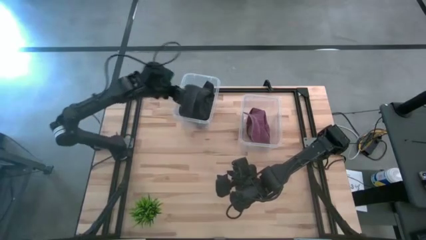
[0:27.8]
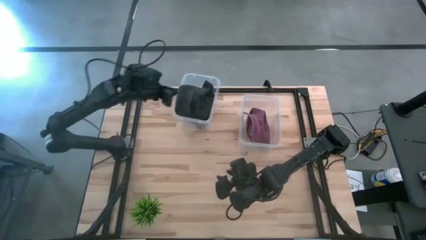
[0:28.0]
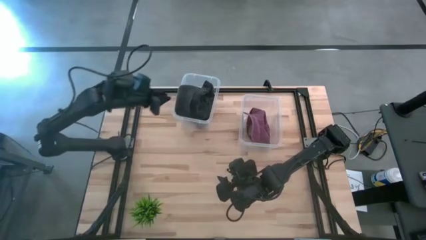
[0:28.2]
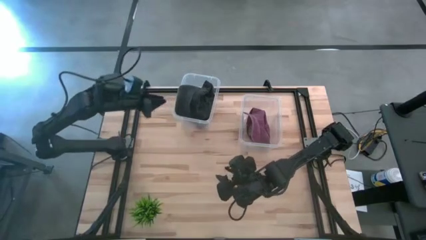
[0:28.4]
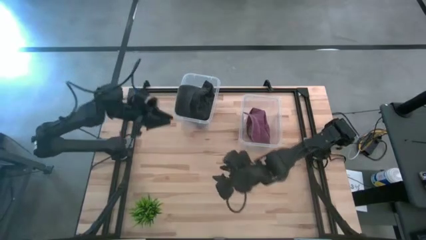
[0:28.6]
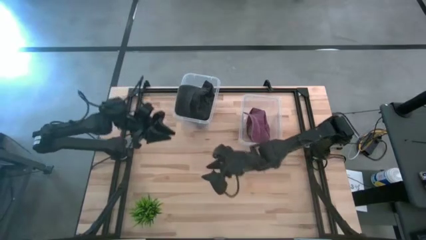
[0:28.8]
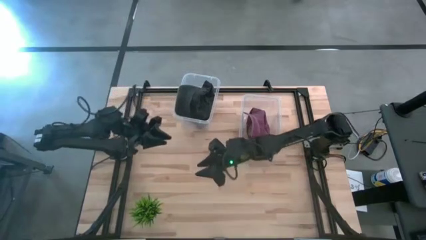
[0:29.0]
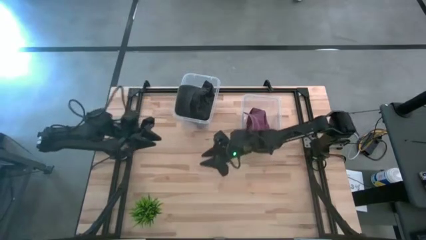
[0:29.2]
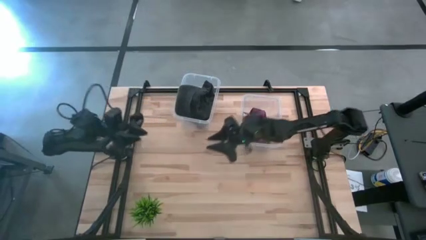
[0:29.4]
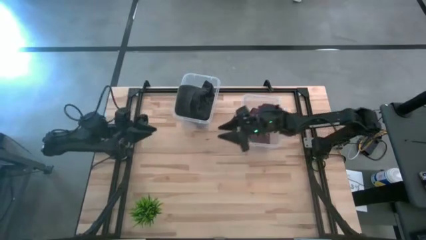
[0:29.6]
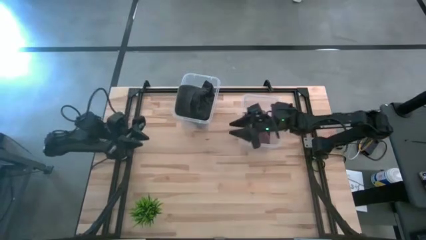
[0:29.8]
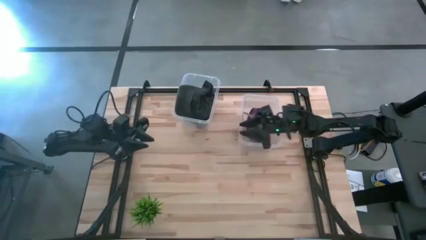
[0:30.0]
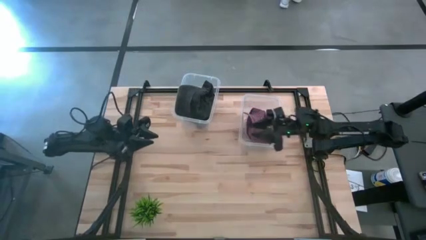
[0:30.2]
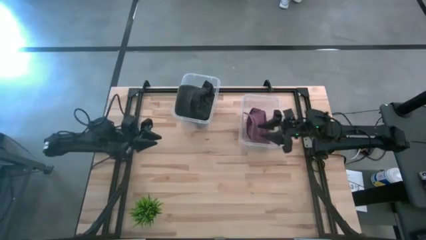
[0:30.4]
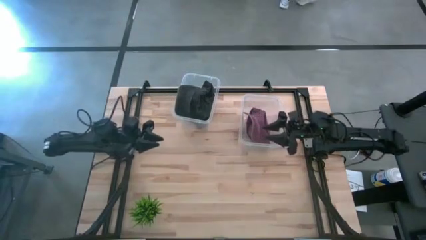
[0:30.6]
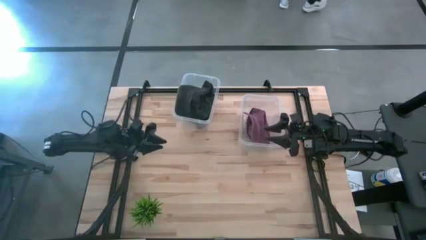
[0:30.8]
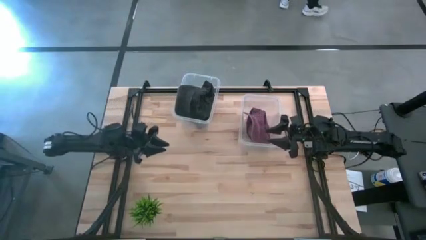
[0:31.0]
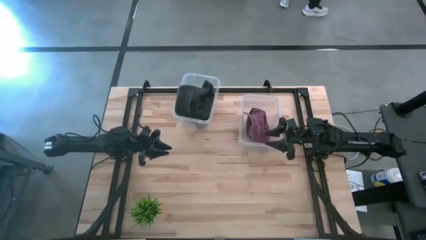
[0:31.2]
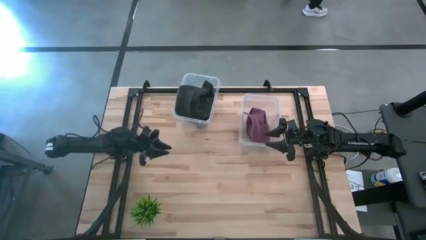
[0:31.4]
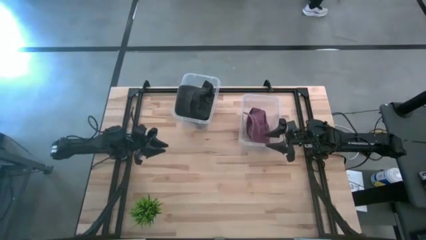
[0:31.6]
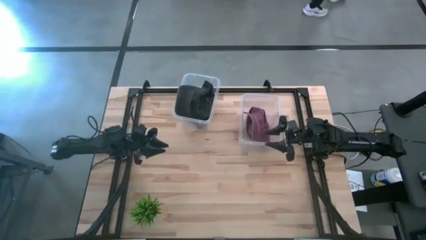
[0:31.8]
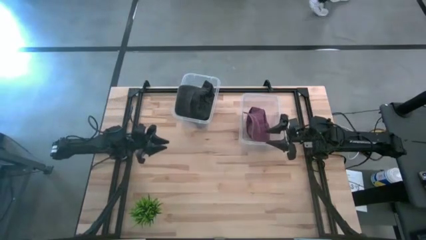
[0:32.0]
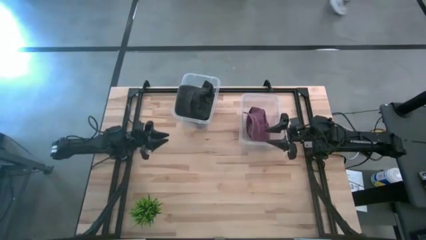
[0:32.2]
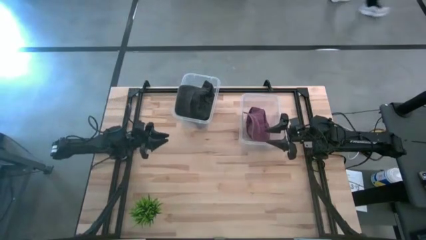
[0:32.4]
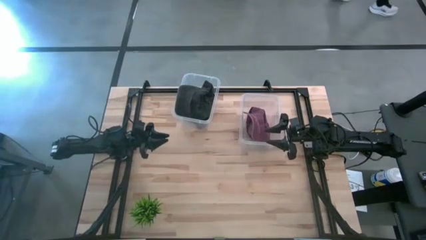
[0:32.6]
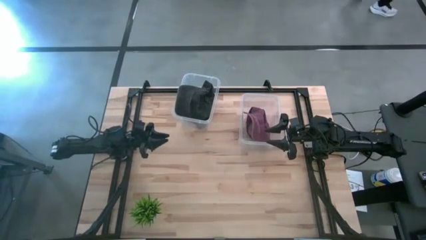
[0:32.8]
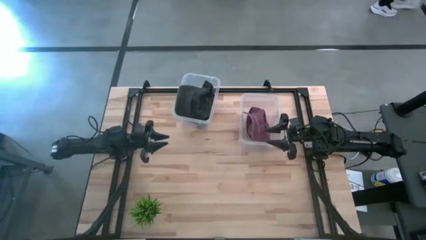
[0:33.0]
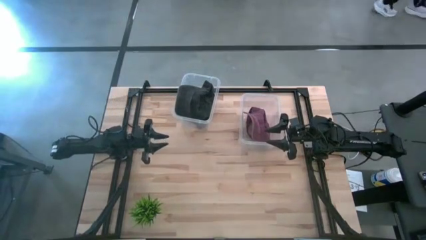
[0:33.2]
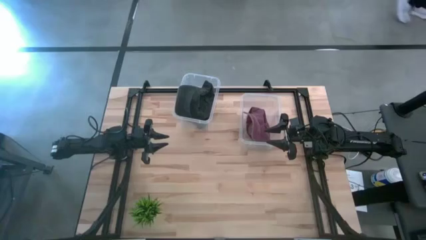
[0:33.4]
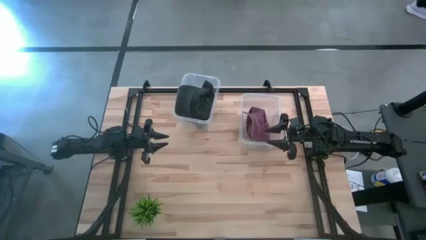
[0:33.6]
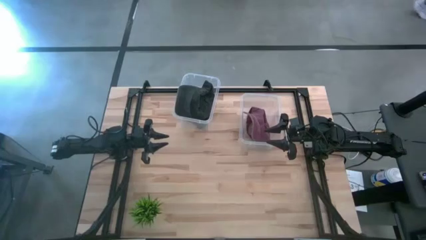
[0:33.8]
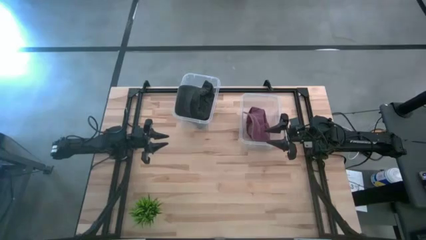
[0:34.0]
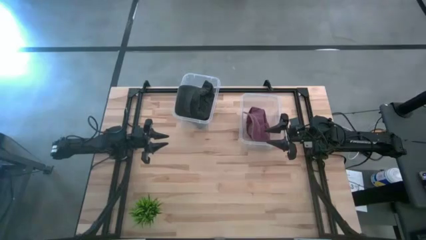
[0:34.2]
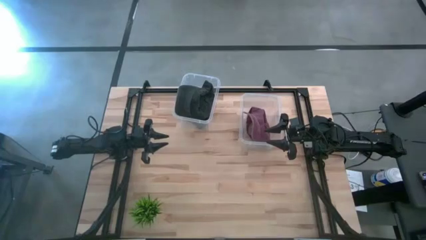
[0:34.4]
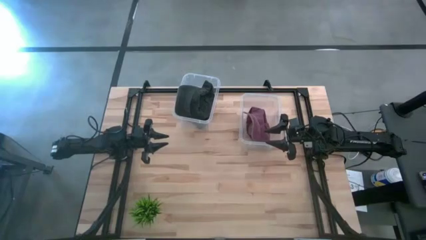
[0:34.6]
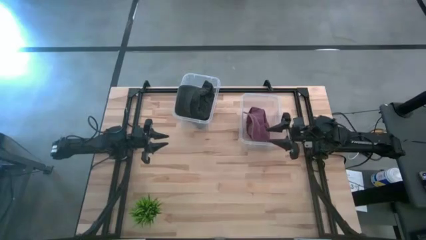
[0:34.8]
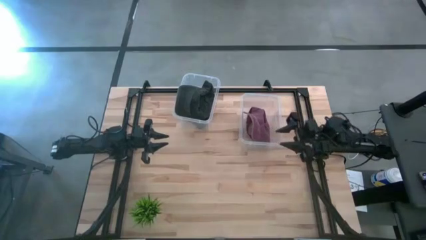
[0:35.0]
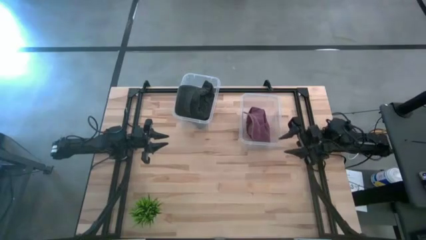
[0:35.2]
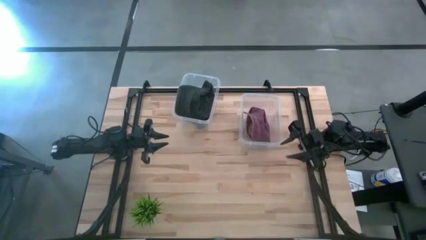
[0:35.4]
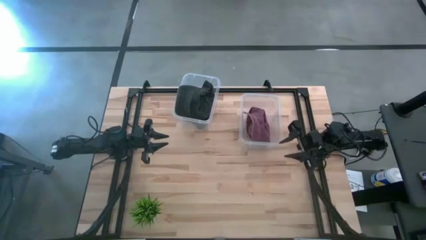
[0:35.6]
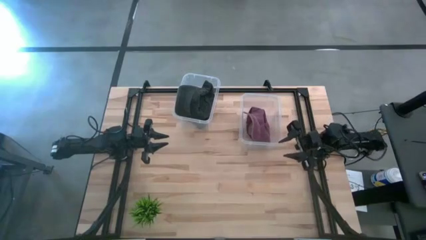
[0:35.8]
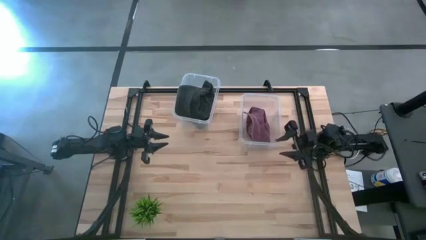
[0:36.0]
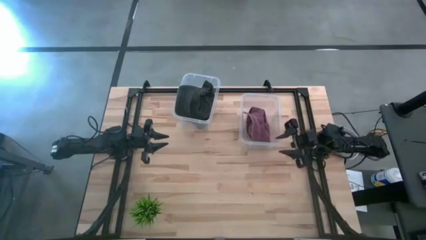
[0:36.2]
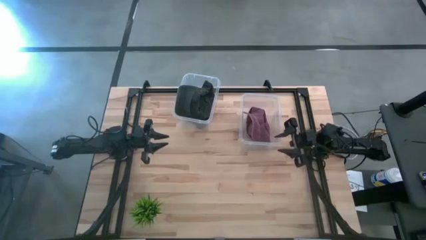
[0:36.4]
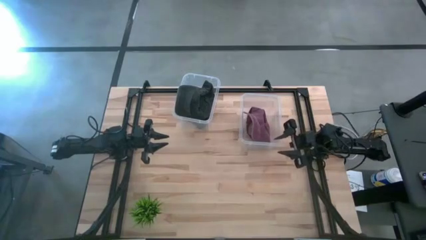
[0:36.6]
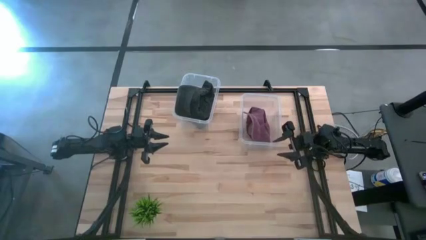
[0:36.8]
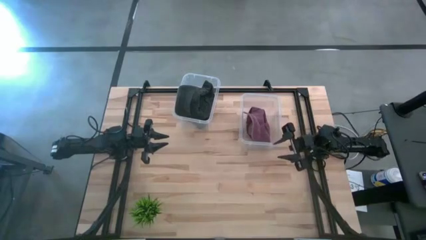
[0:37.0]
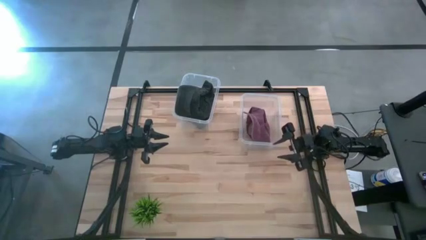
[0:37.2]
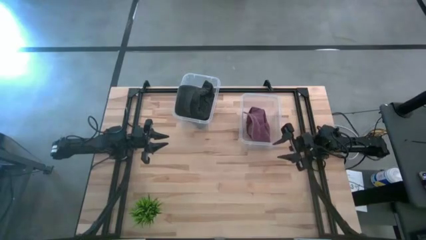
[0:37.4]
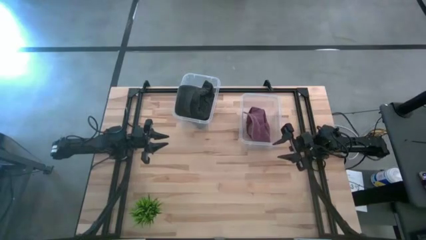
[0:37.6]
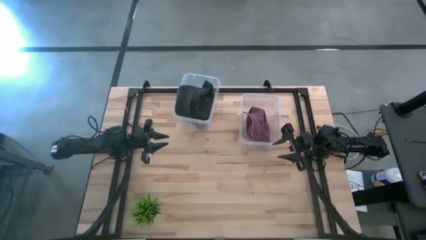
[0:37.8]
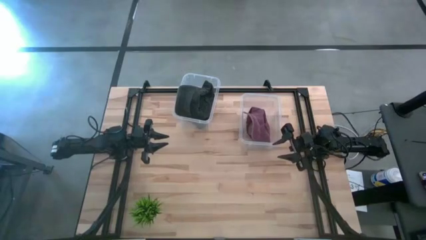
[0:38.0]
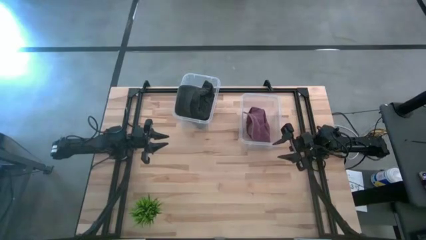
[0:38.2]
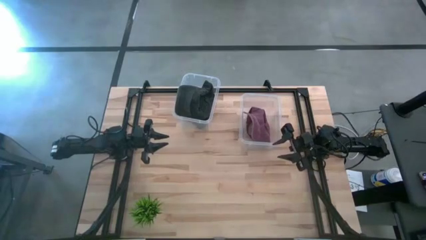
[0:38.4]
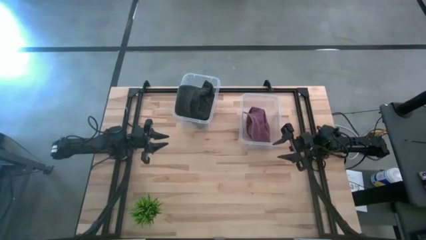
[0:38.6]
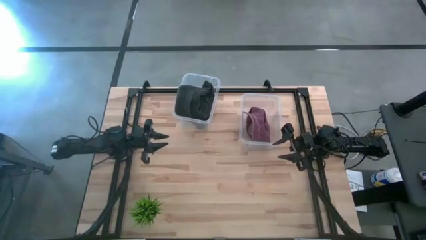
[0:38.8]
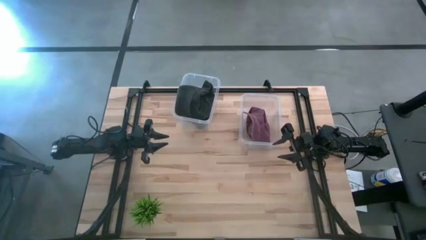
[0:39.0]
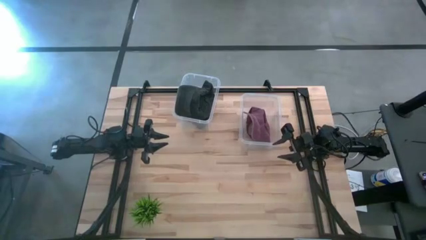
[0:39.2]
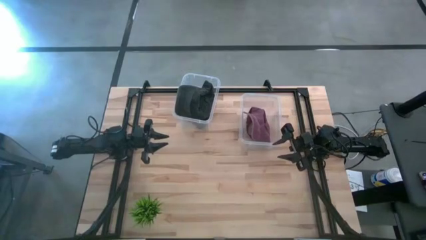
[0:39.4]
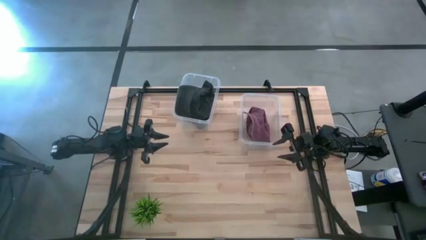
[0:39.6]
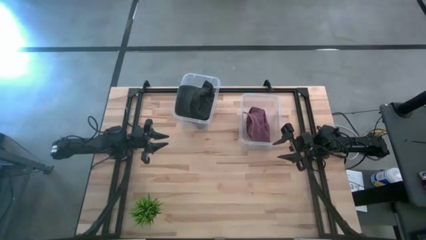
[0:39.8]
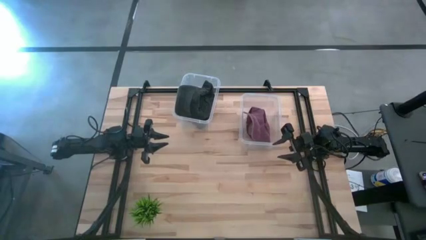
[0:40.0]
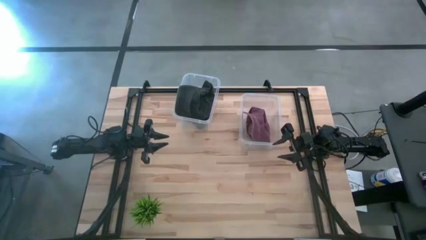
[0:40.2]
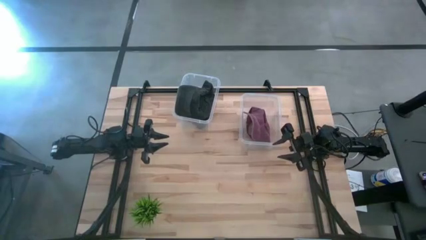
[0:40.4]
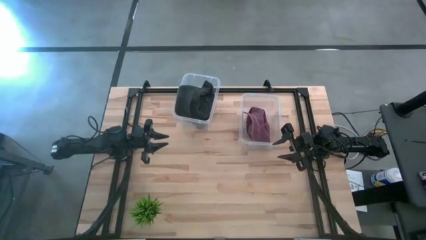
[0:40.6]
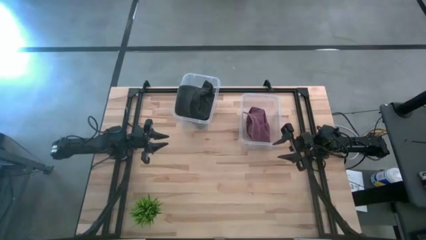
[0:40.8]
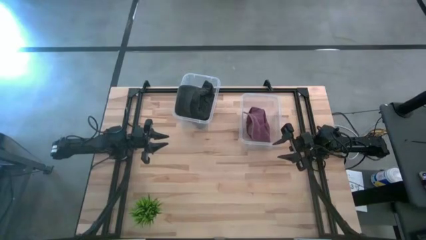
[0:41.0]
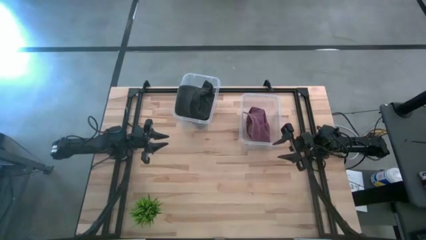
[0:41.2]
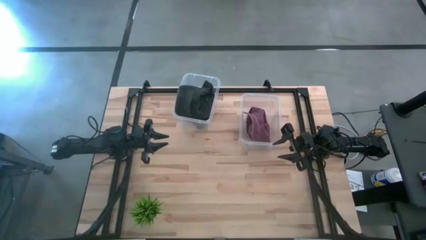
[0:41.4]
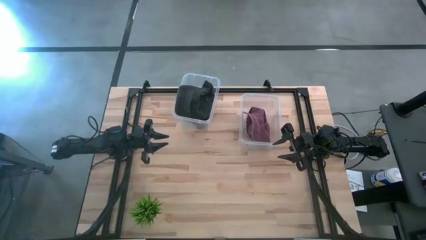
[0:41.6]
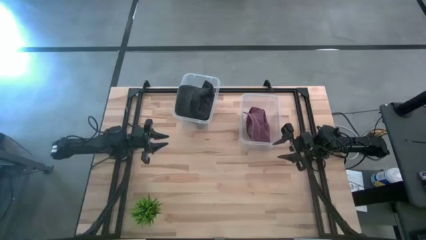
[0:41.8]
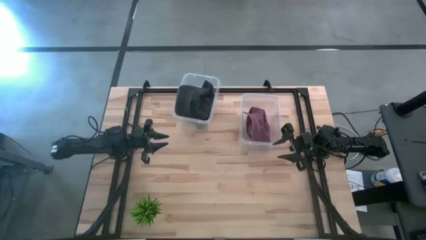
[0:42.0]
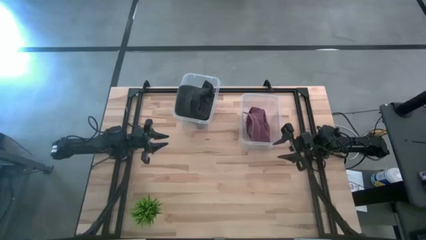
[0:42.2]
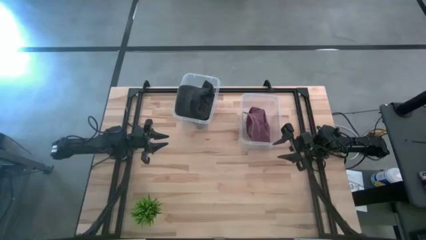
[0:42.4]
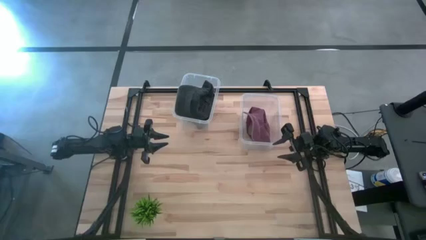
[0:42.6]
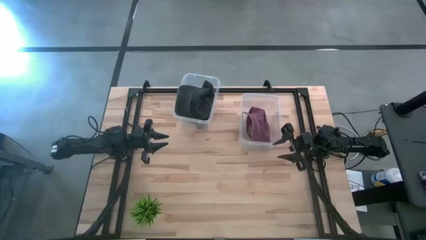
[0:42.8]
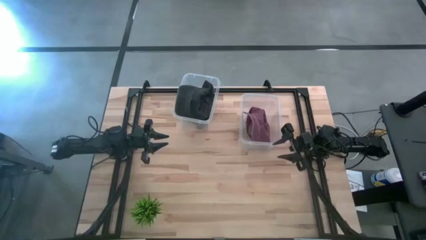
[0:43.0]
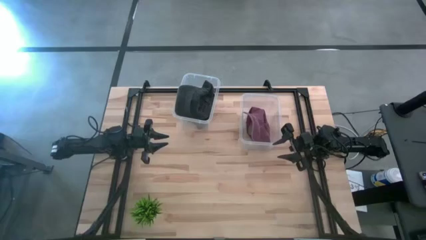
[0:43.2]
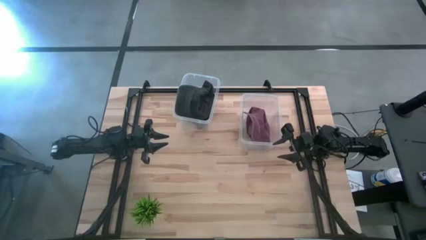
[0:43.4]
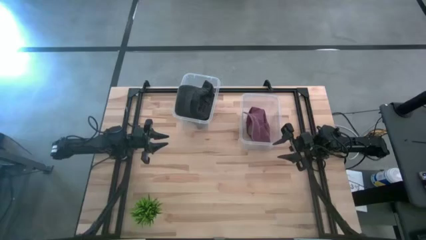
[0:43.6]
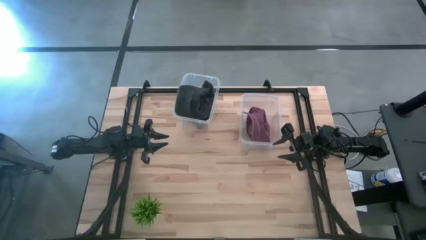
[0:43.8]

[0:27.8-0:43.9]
Task: Pick & Place hat
Return to Home Position
